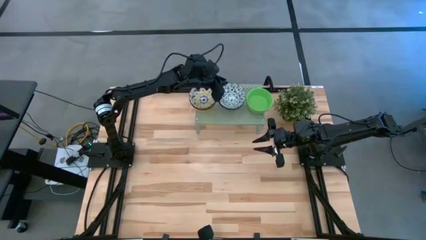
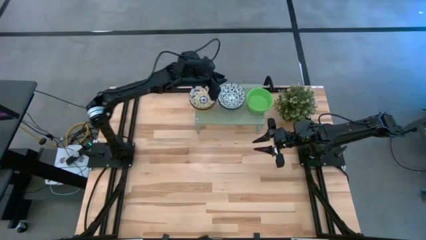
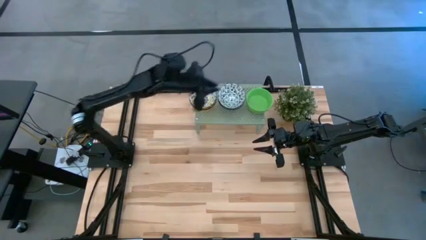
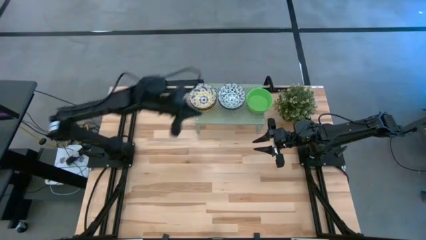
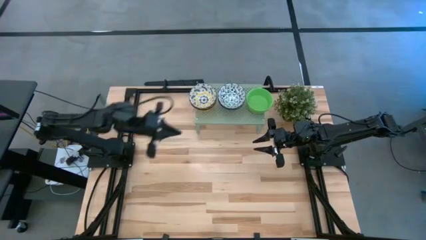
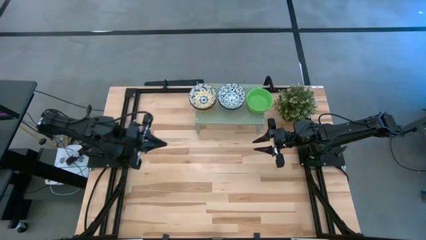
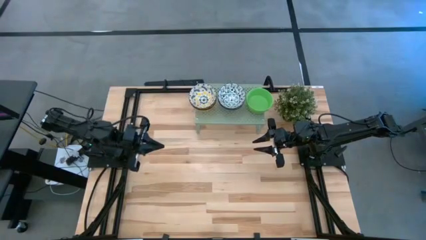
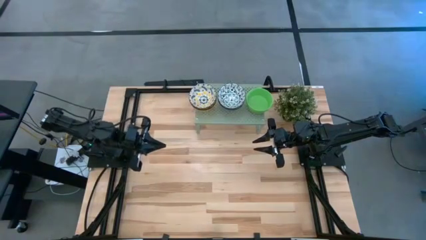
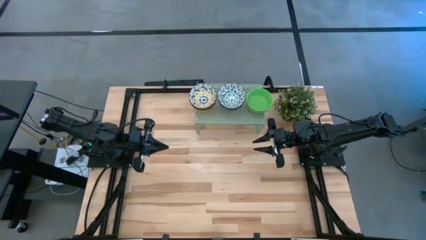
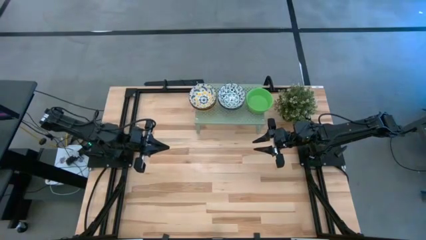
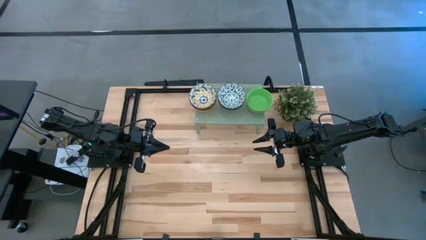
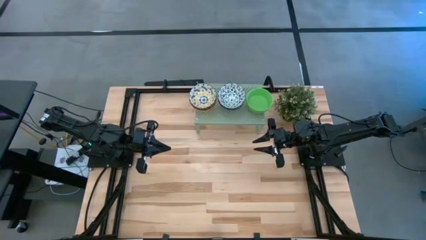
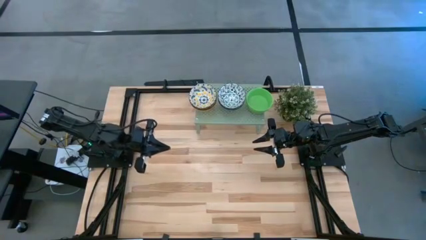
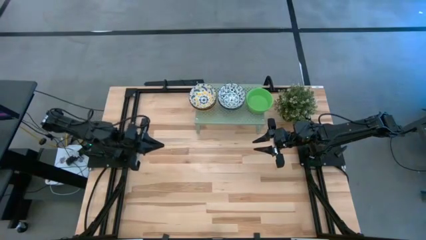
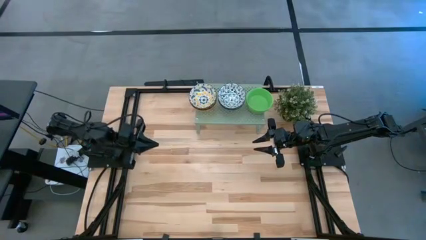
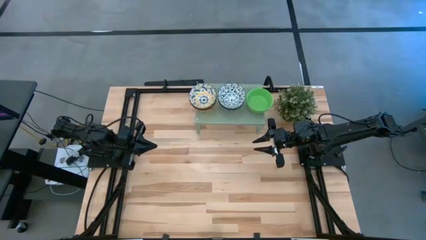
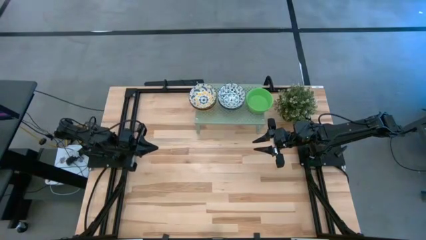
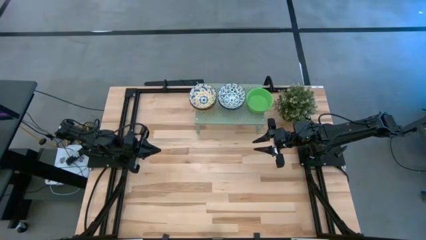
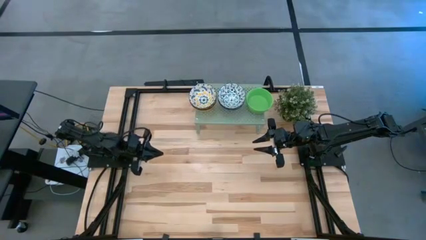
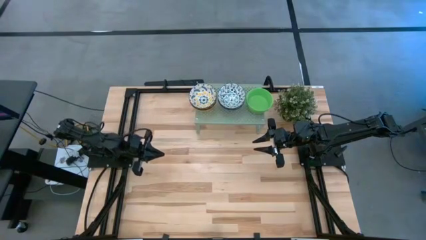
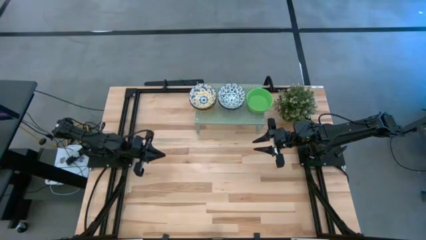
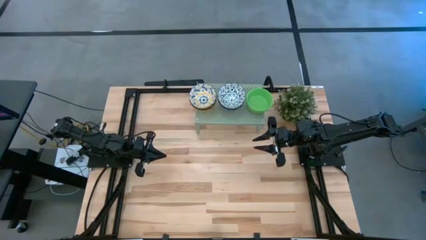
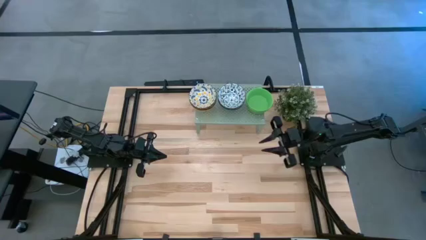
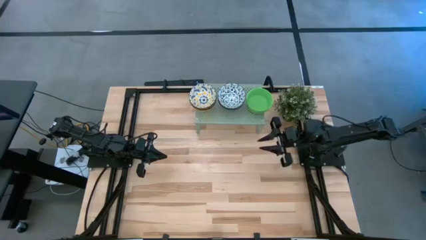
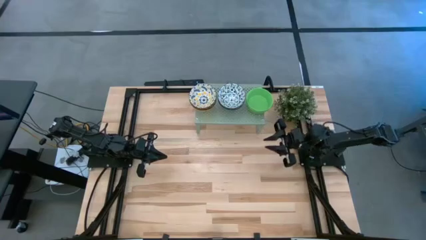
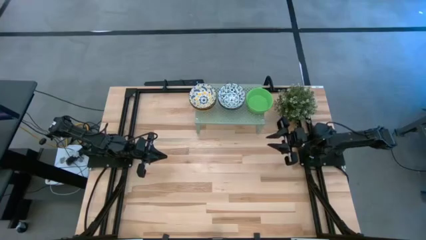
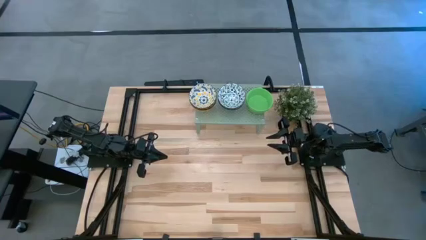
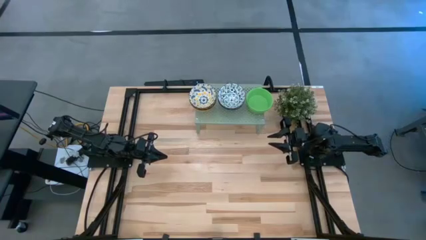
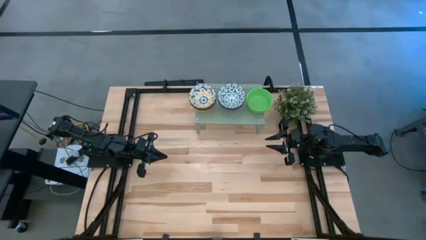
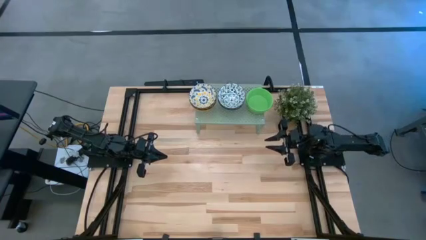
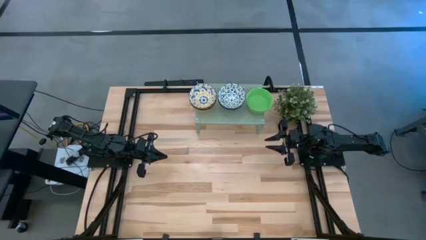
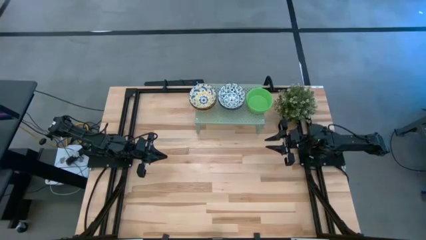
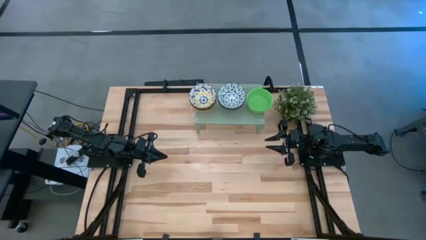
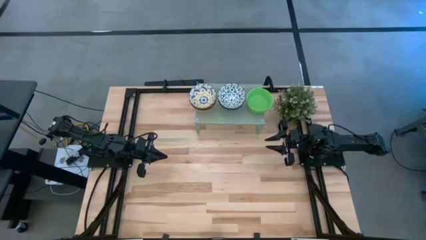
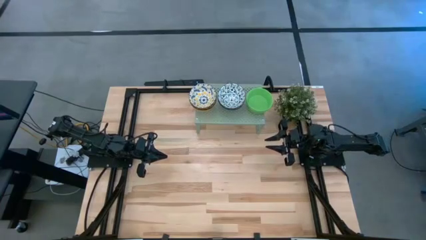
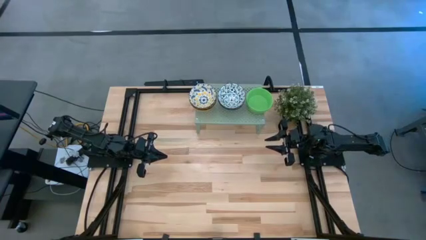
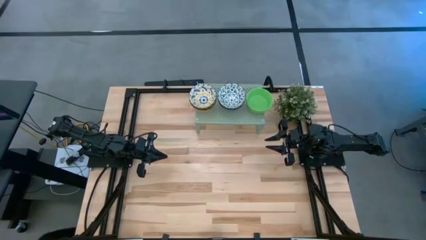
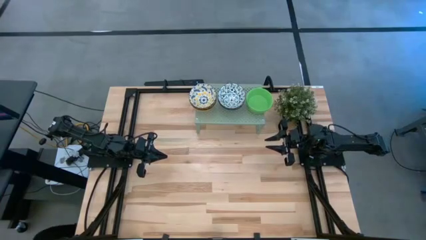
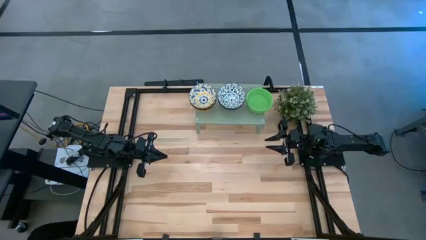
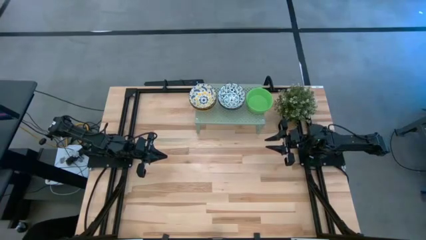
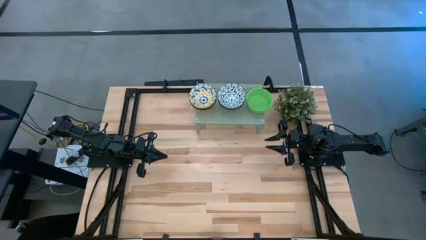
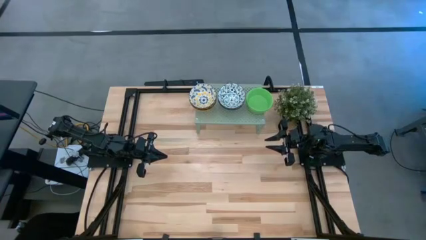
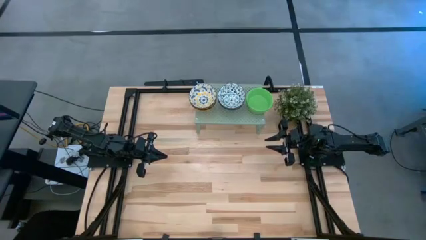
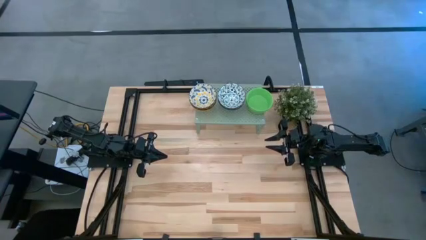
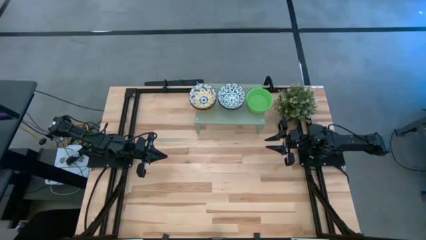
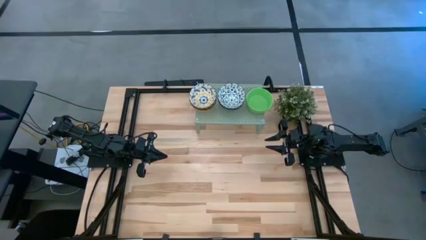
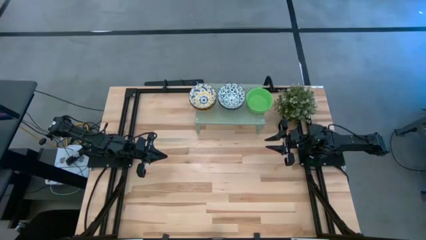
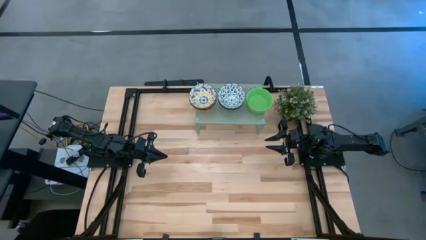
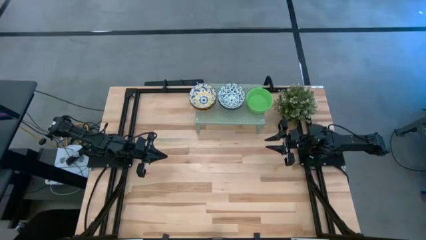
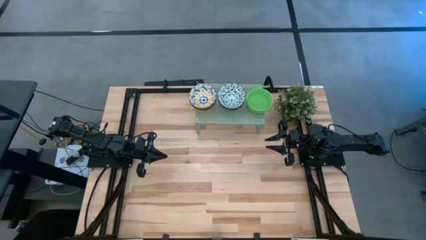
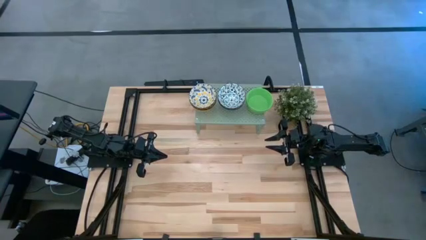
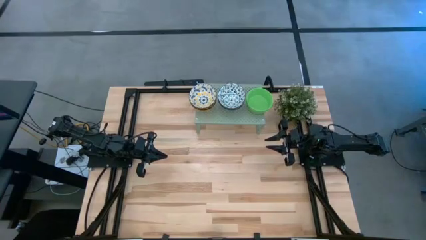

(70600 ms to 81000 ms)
Task: Pick & Place Mini bowls
Return to Home Position
